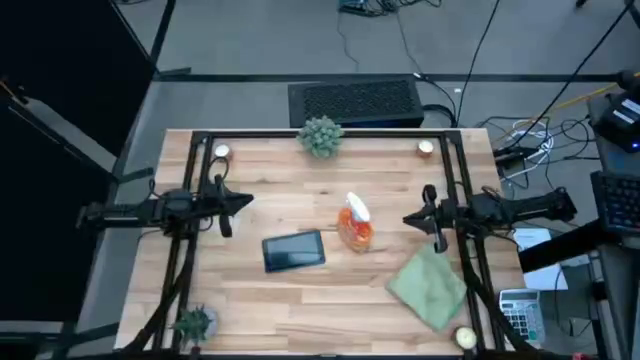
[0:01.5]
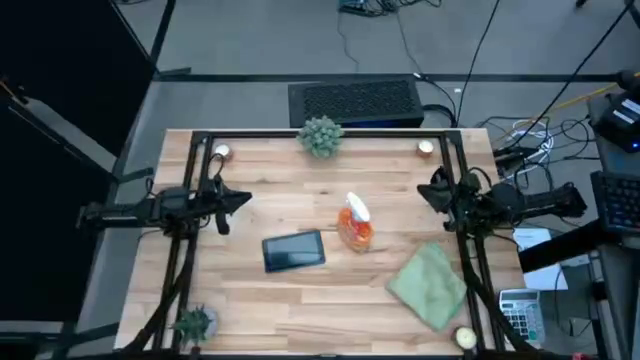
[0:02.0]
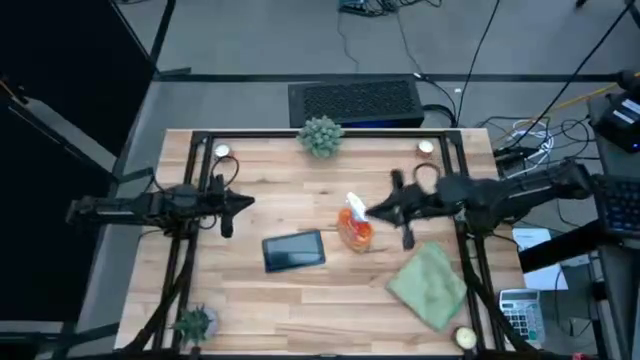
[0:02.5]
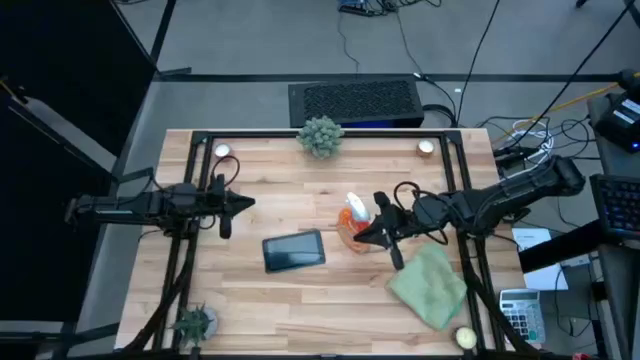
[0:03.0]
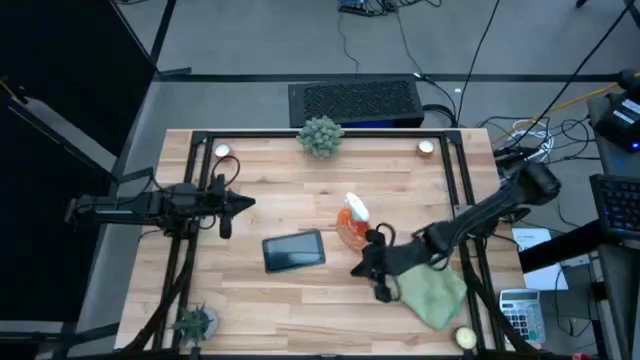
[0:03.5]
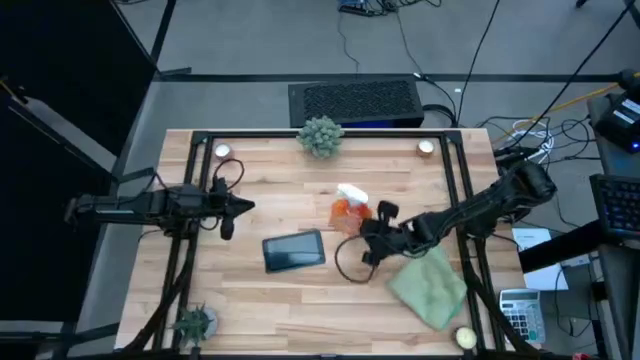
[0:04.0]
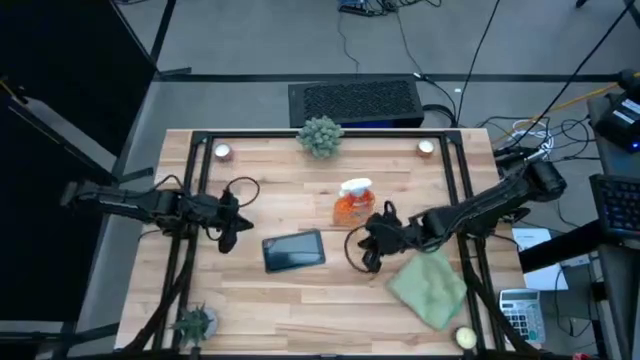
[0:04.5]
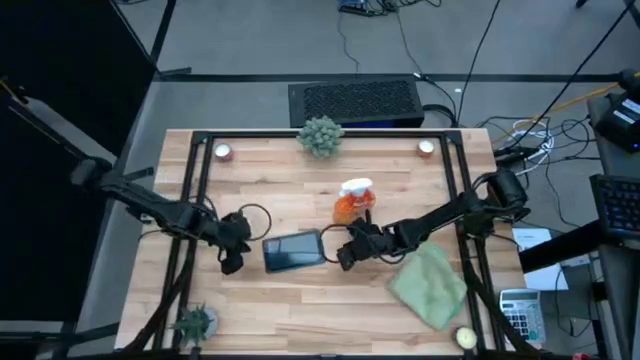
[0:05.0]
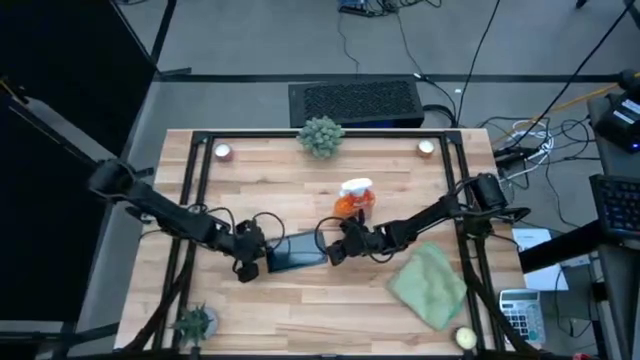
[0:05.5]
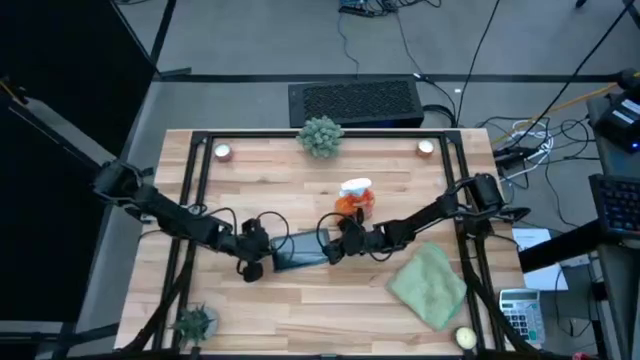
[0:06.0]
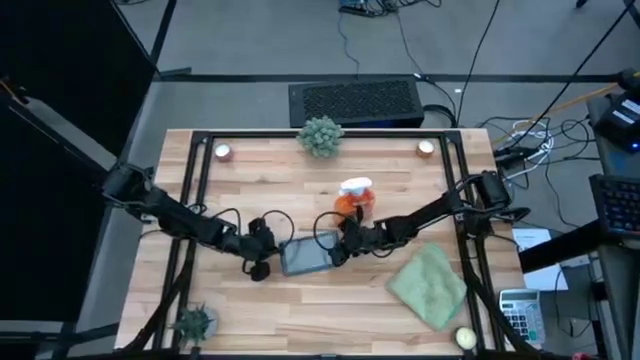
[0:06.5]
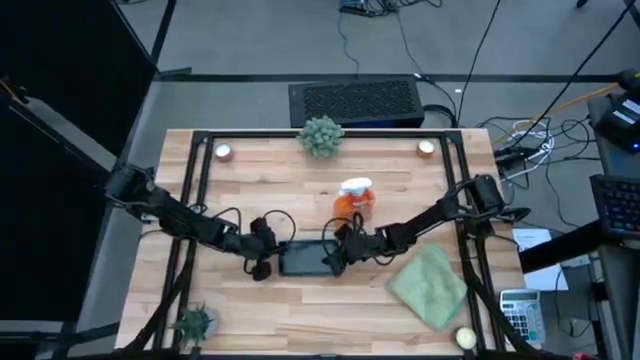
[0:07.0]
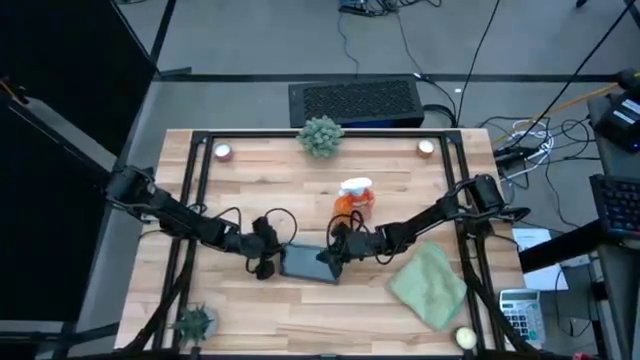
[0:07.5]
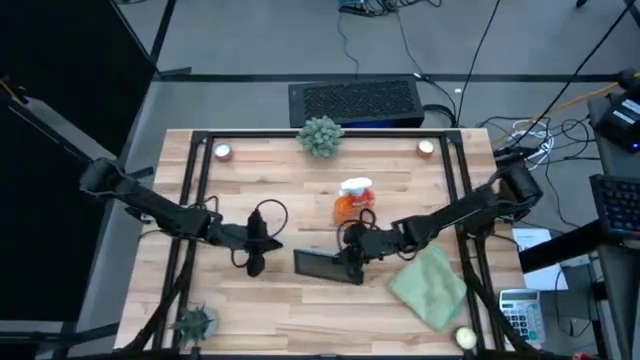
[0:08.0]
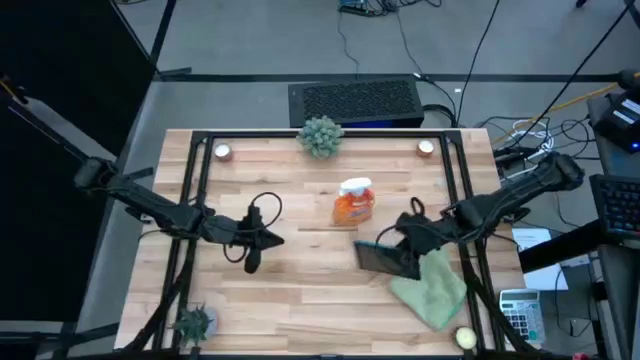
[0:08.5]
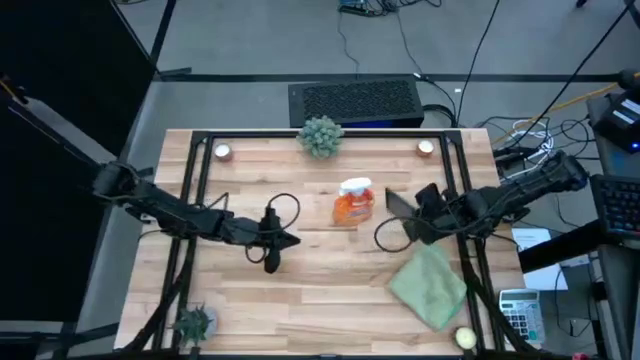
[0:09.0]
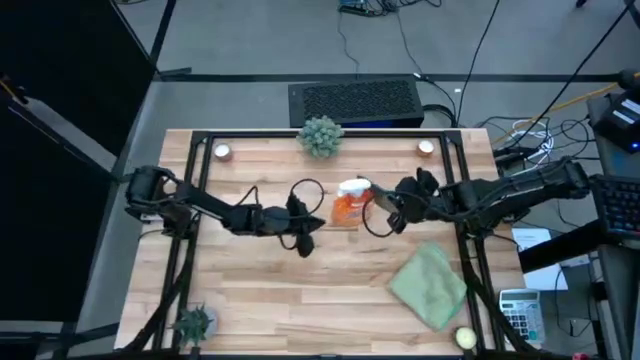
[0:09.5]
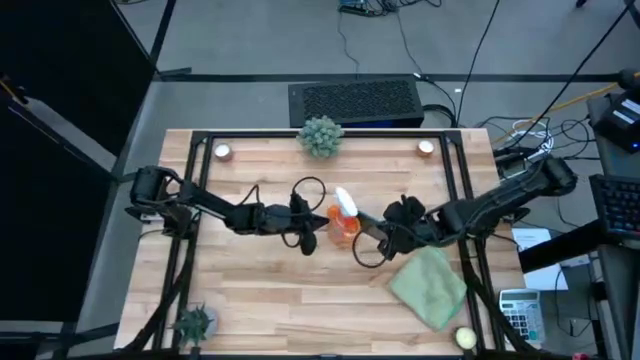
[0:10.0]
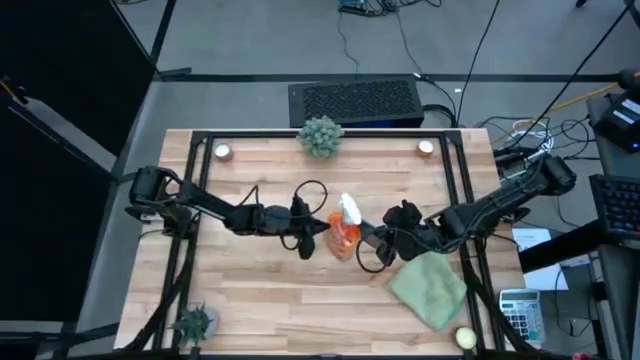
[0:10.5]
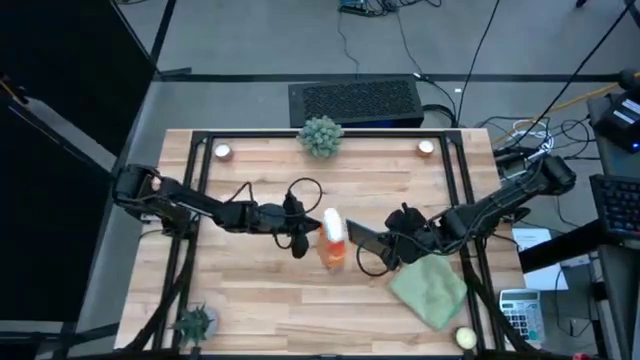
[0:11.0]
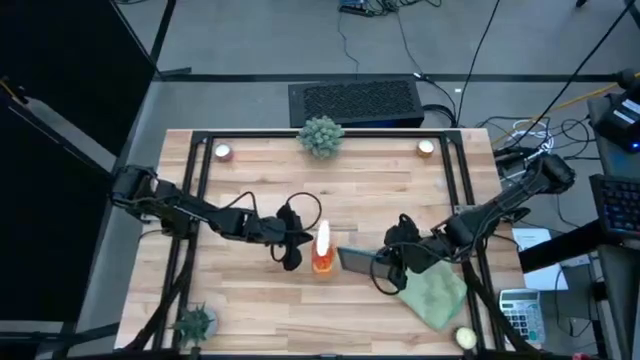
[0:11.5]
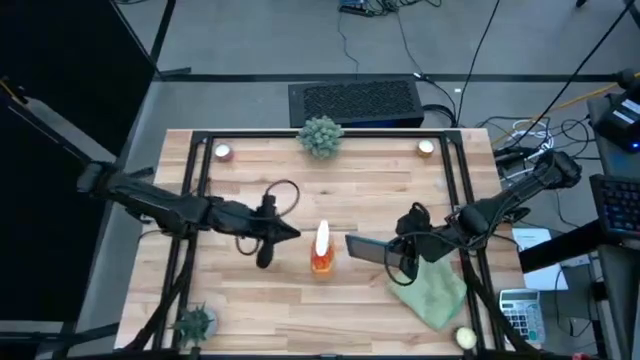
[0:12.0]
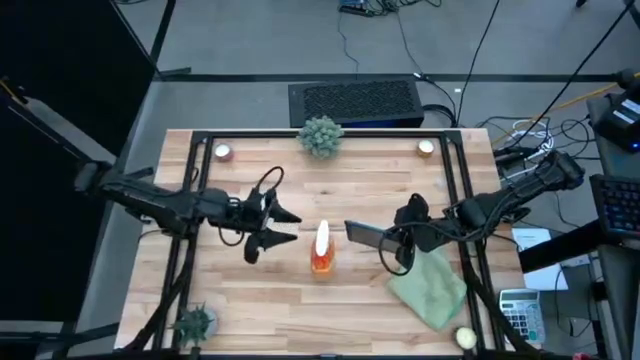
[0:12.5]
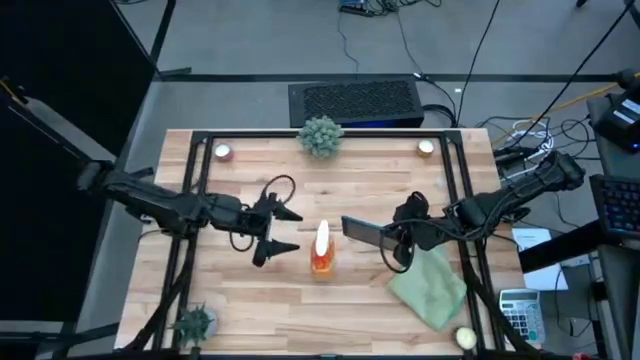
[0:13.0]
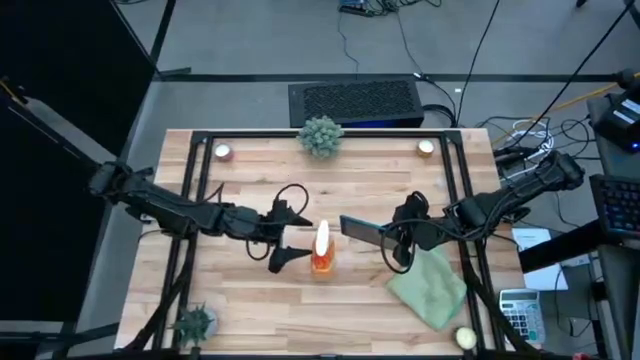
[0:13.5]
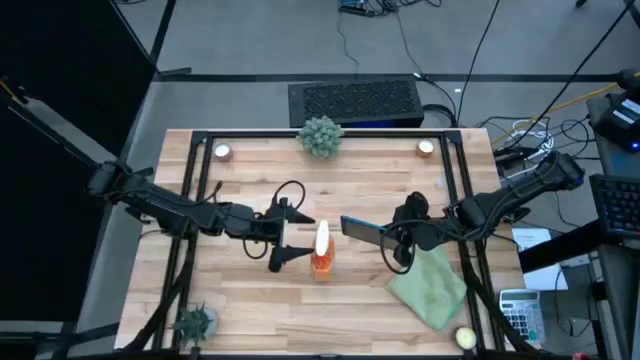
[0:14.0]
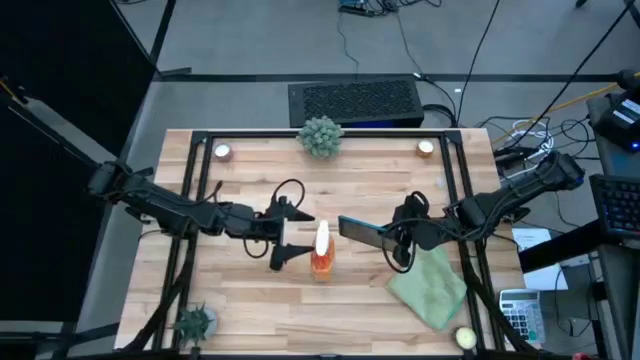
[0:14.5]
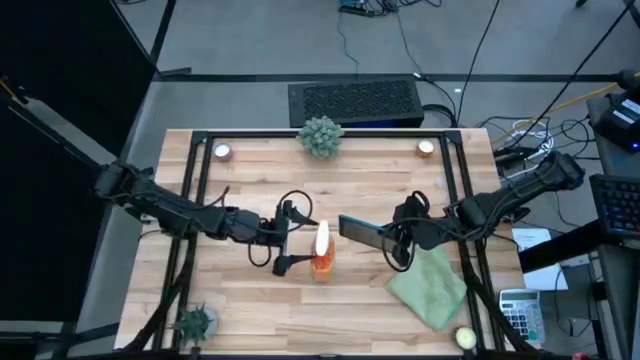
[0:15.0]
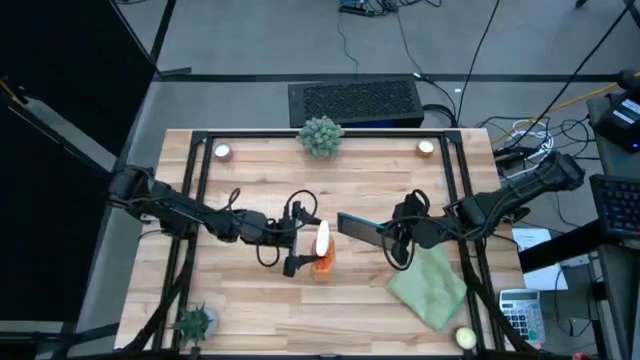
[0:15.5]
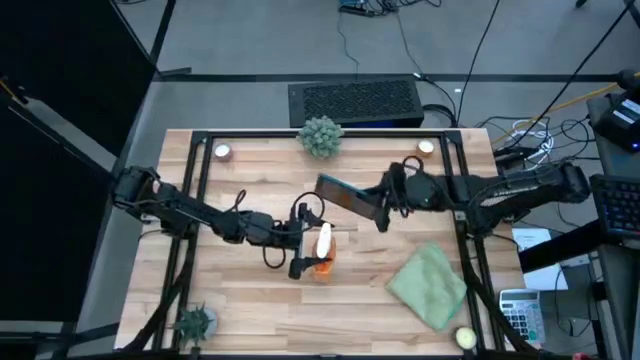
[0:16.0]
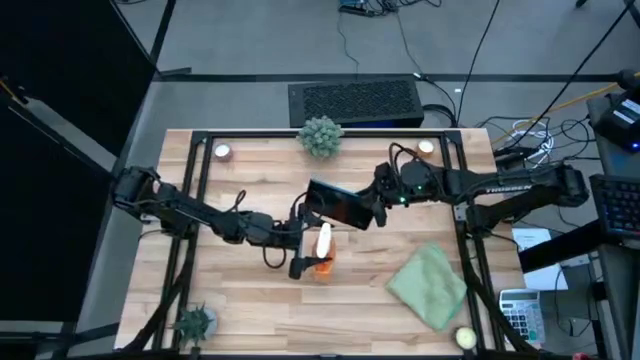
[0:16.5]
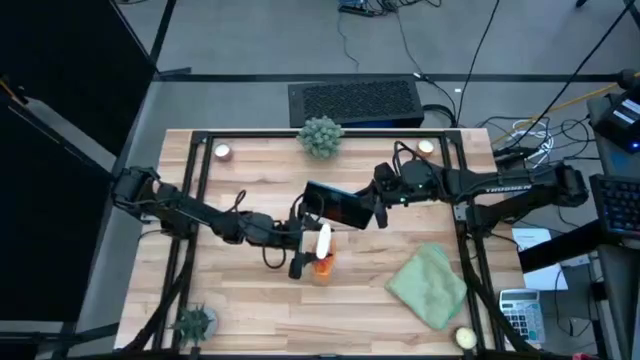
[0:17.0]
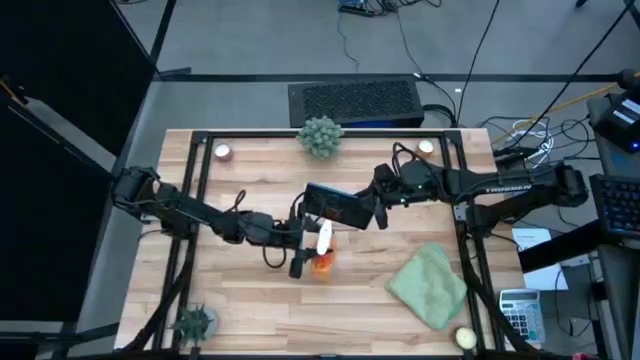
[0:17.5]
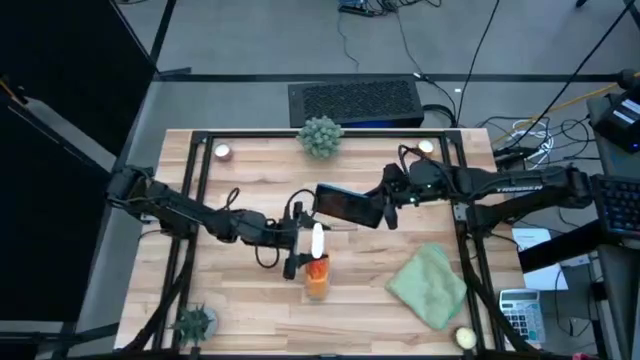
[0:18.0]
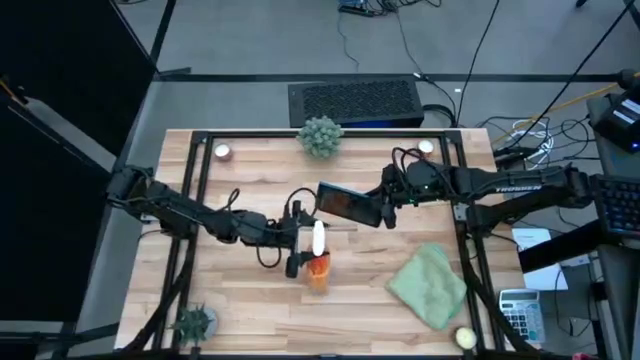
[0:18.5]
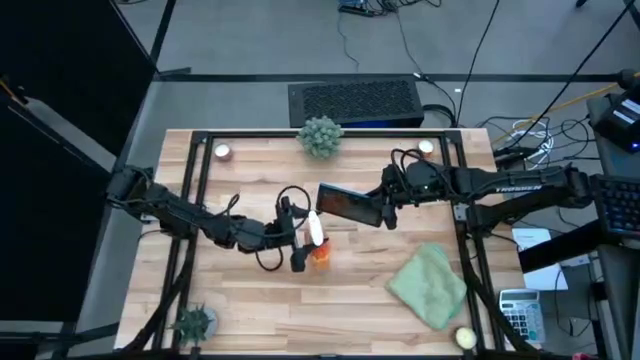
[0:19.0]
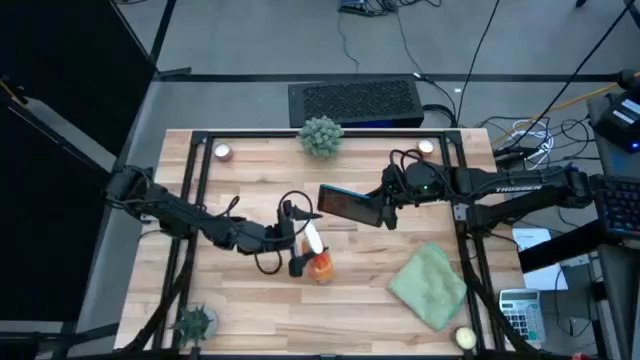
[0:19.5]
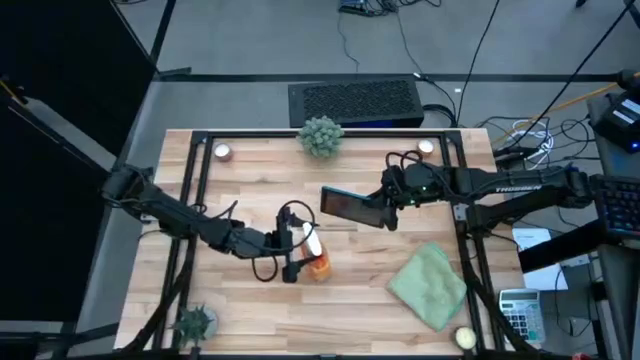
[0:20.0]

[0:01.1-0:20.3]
Task: Apply microfiber cloth
Spray the front of the tablet using the spray bottle
